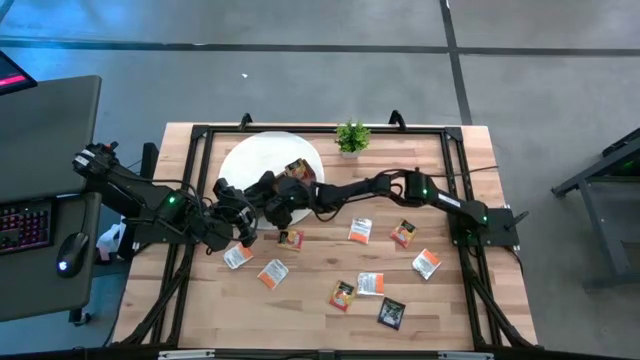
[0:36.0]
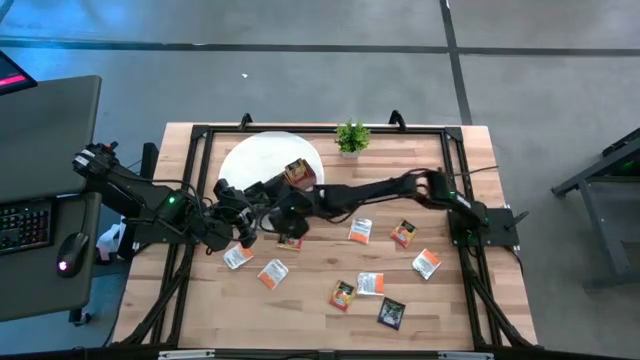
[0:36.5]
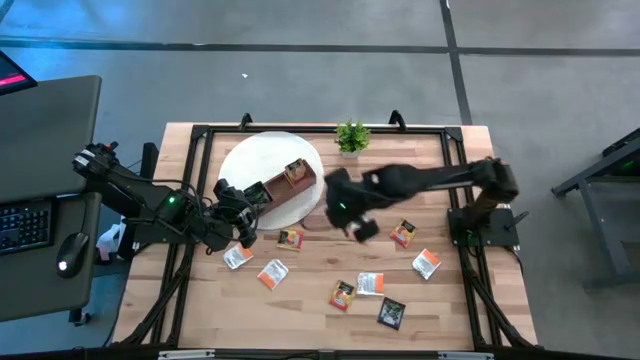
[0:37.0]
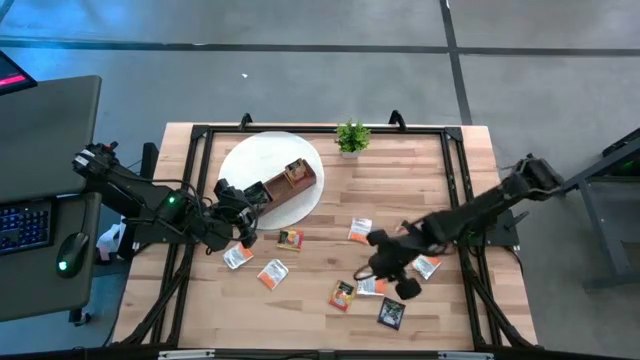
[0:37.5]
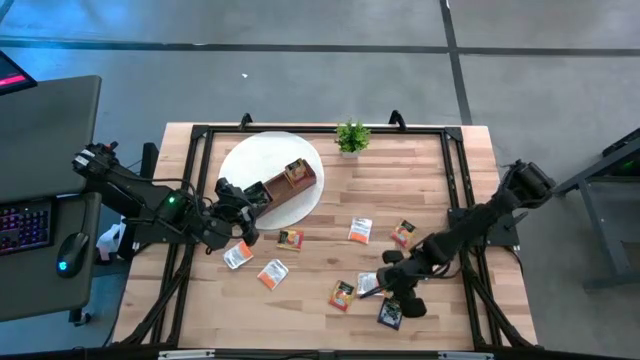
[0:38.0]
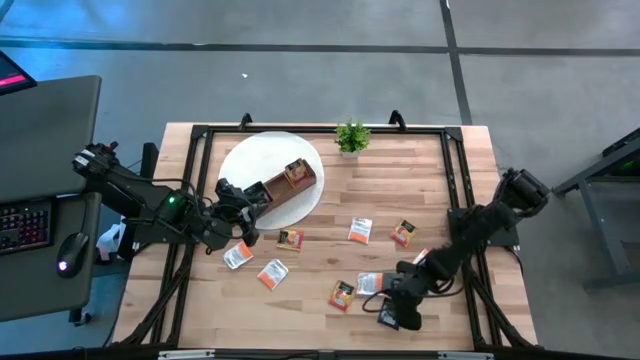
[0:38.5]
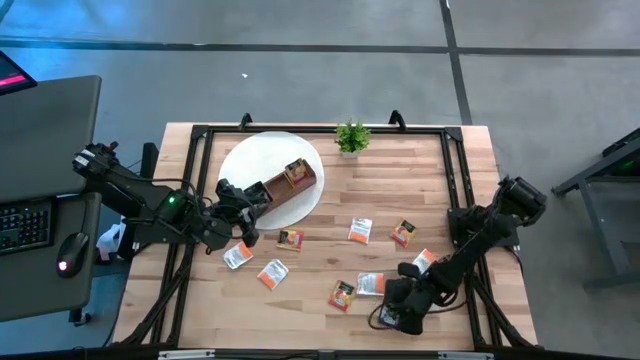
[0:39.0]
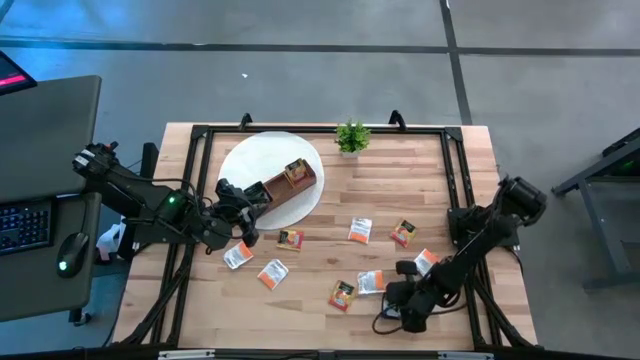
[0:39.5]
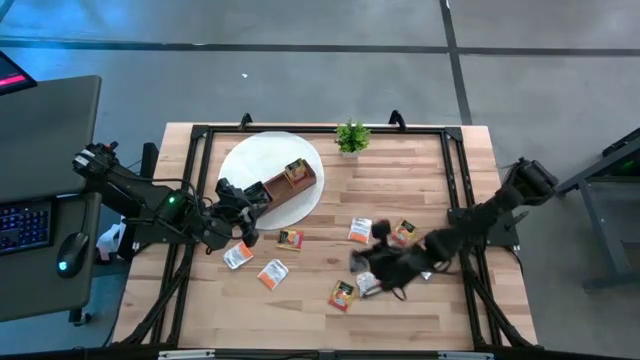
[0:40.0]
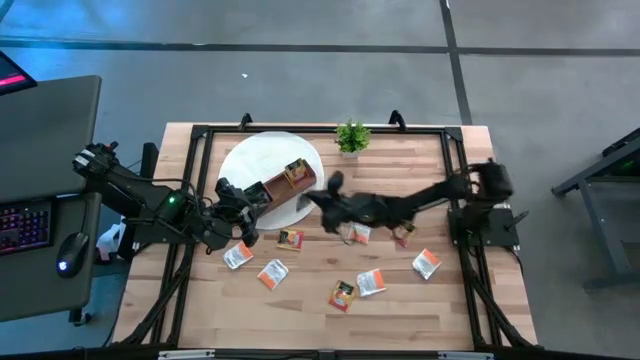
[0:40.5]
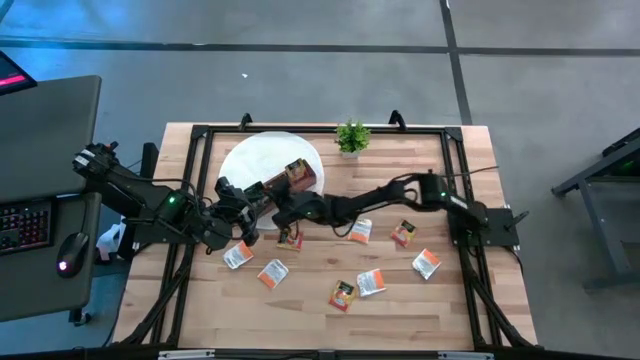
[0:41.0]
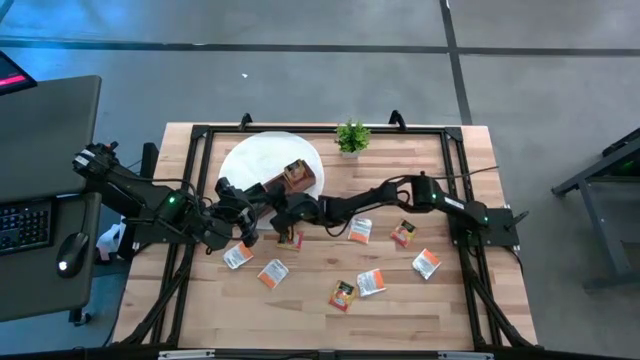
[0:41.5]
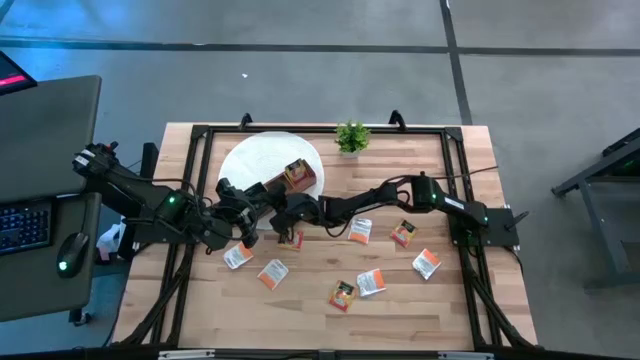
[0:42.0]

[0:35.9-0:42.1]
Task: Pick & Place Tea
Put the purple tea bag into the left section of the wooden organizer

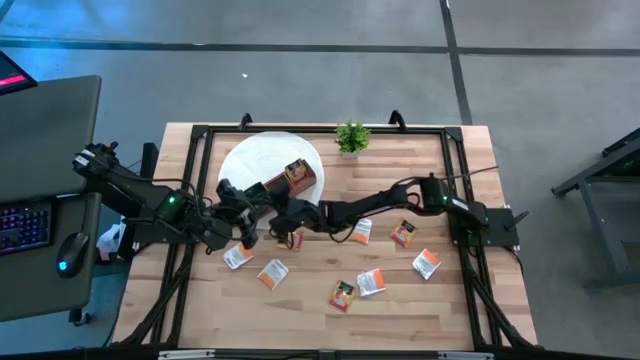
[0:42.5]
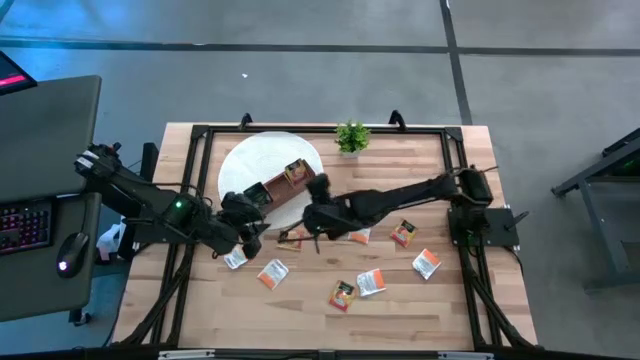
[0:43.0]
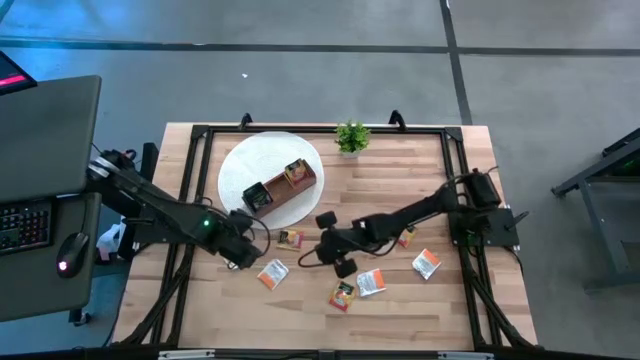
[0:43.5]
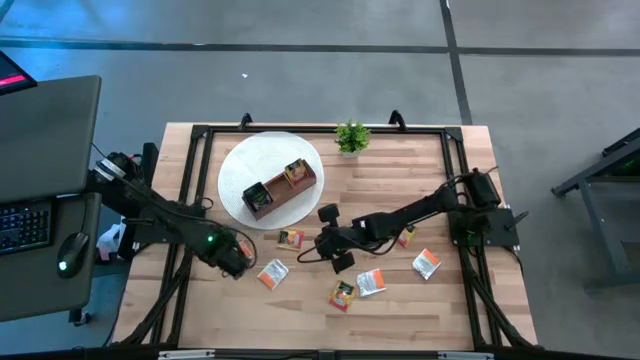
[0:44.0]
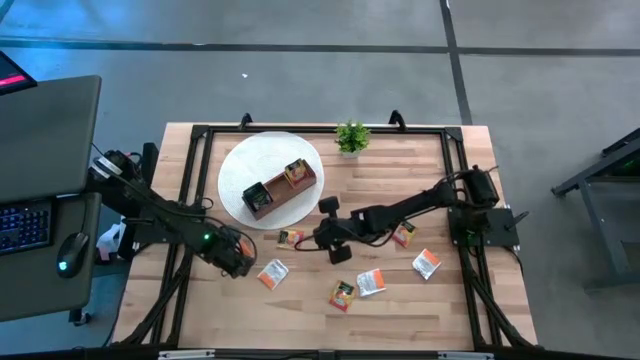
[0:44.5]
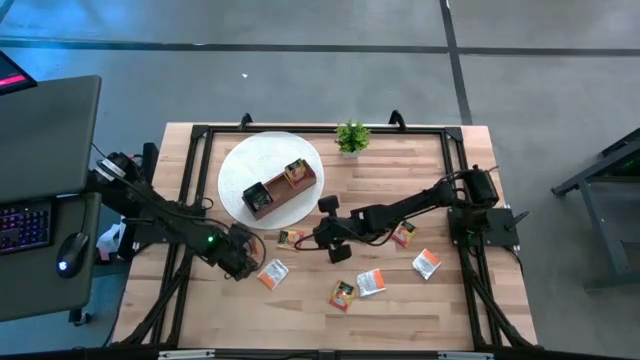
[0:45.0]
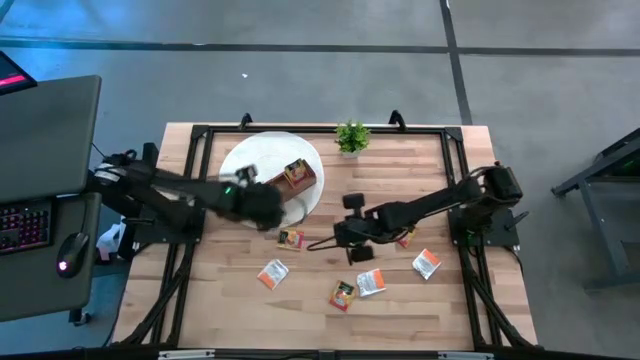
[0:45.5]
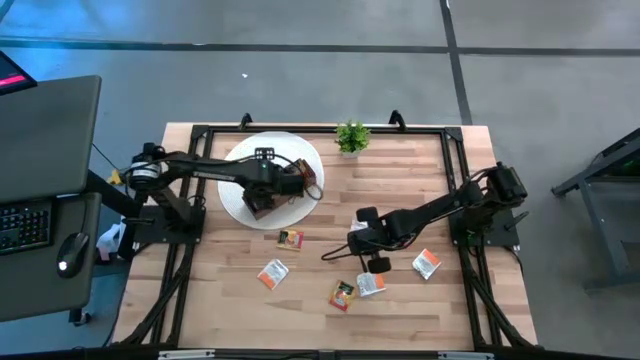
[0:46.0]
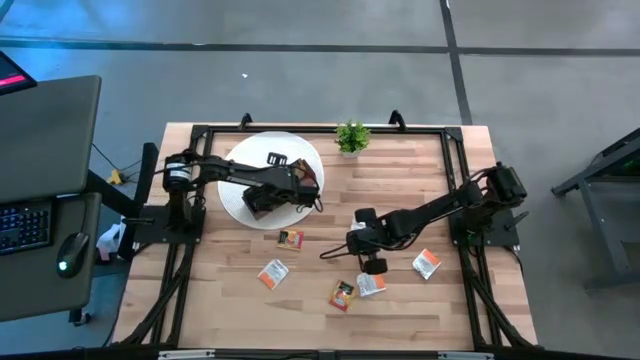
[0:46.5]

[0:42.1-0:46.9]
Put the white tea bag into the middle section of the wooden organizer

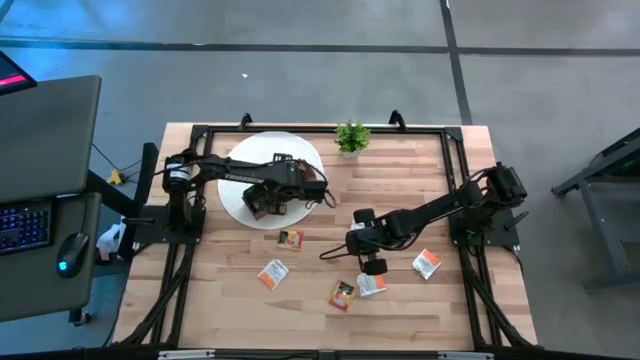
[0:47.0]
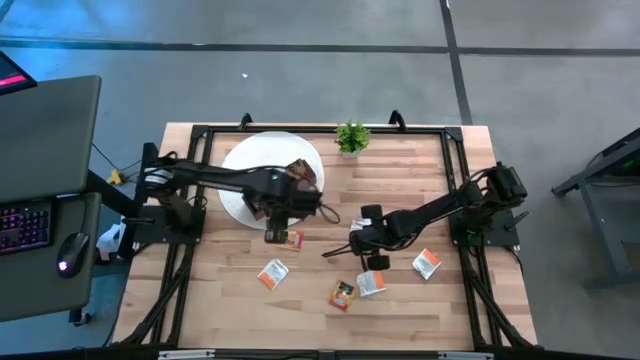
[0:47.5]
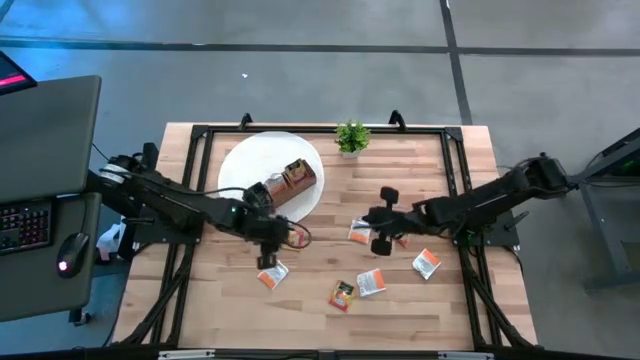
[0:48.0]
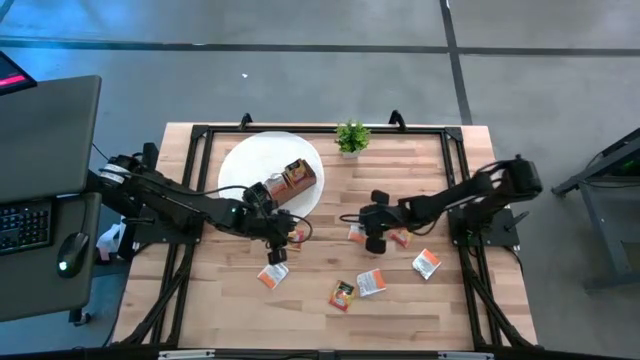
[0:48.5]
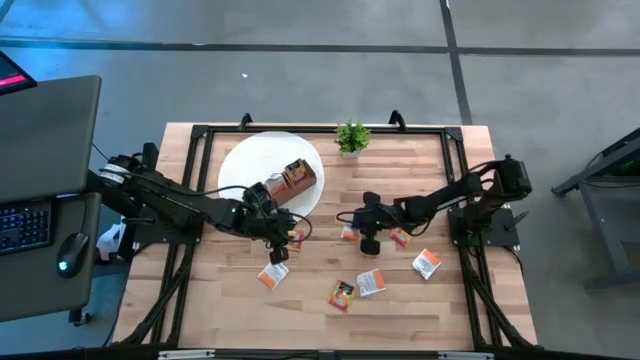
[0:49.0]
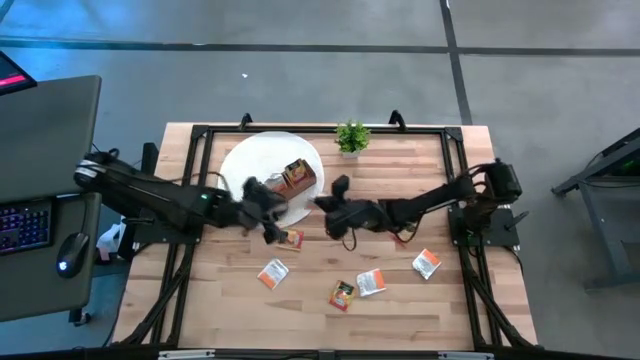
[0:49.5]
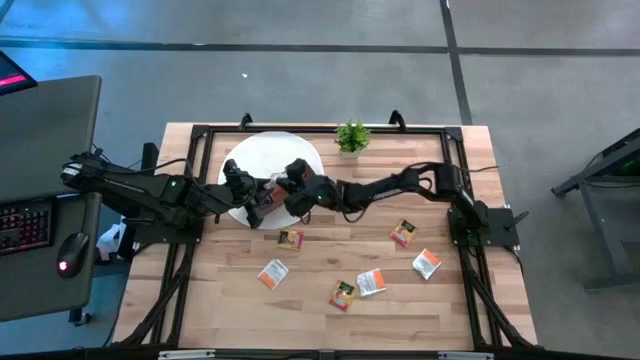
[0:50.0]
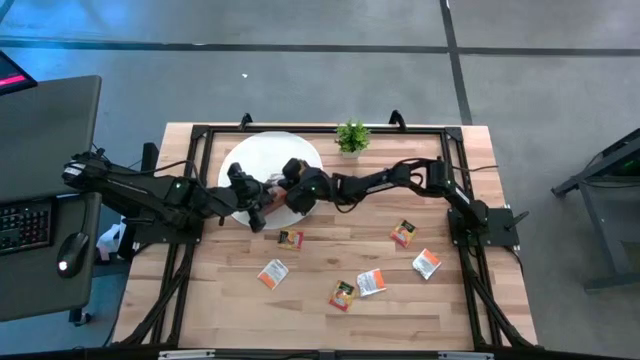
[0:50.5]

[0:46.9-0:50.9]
Put the white tea bag into the middle section of the wooden organizer

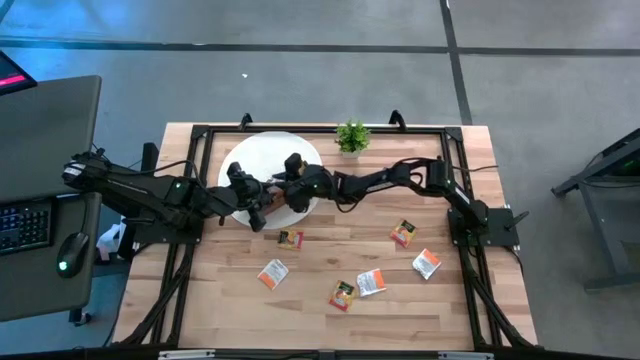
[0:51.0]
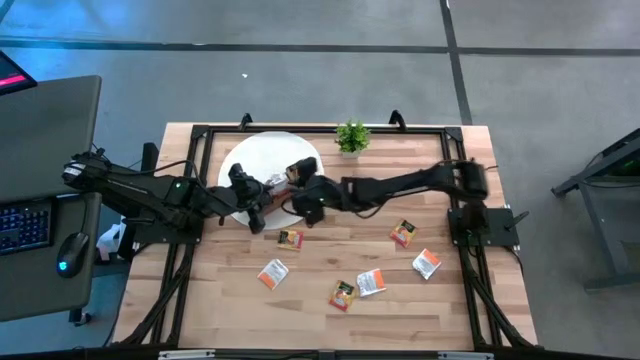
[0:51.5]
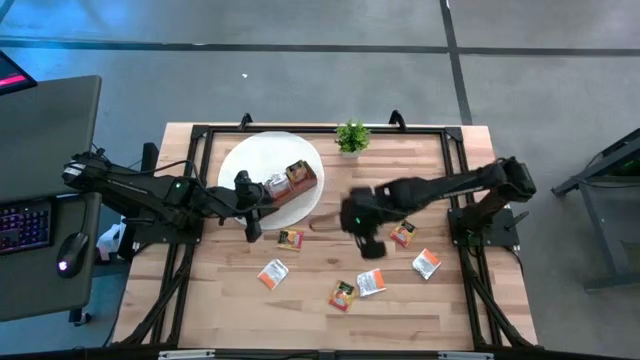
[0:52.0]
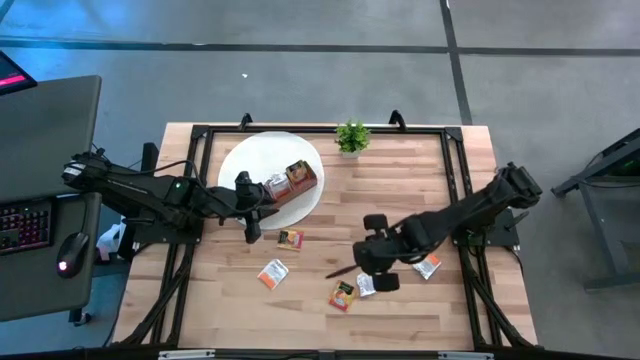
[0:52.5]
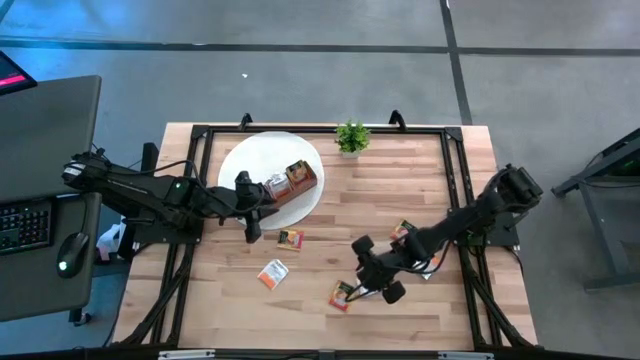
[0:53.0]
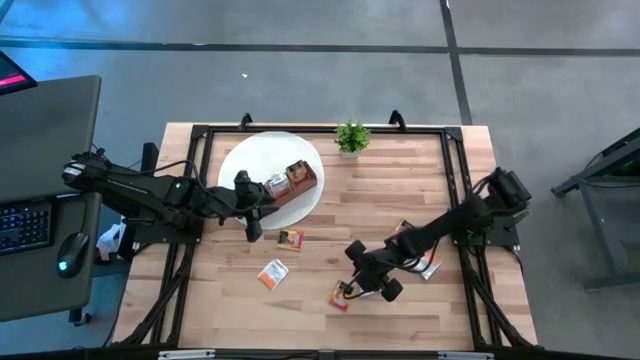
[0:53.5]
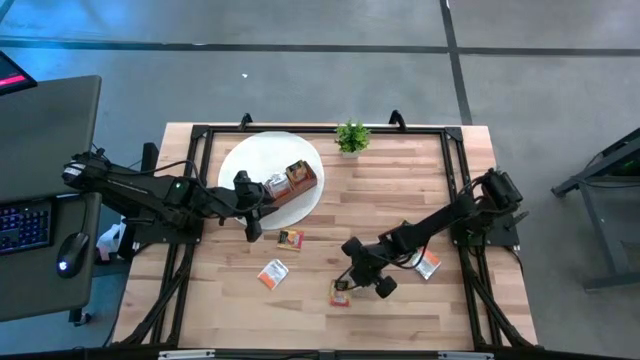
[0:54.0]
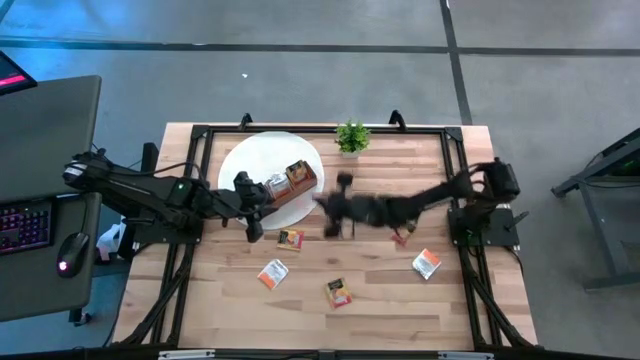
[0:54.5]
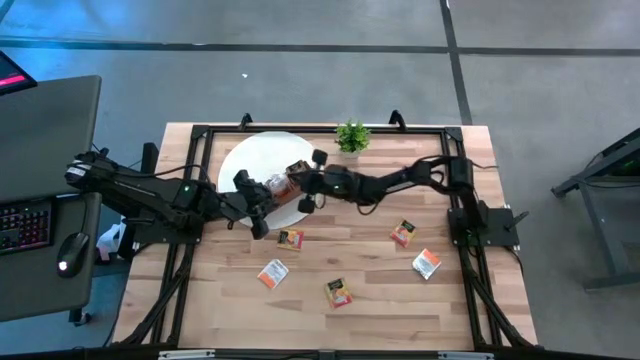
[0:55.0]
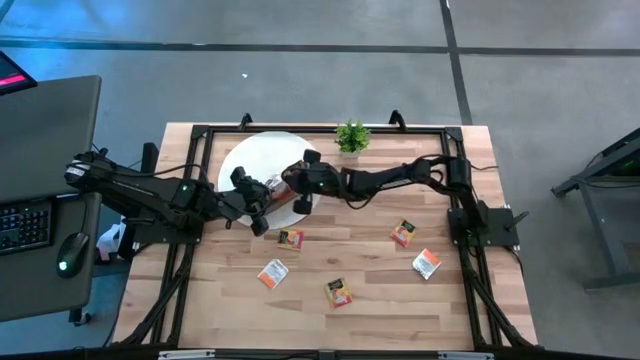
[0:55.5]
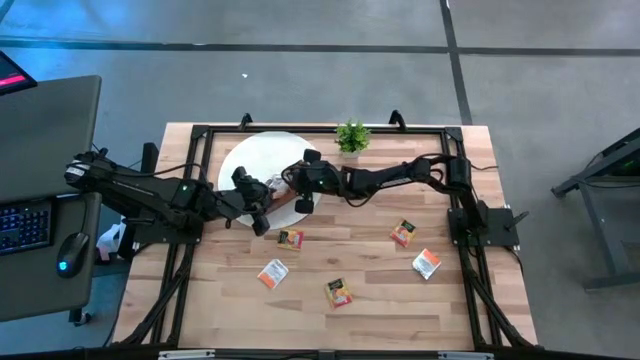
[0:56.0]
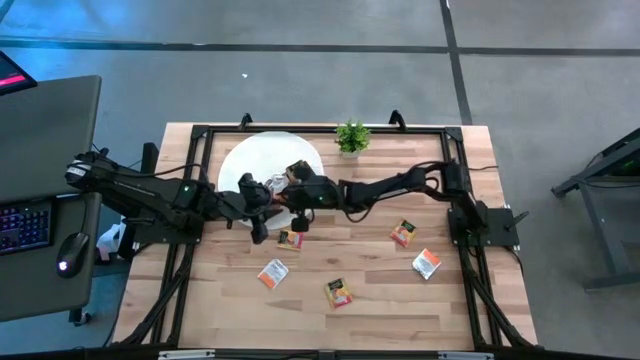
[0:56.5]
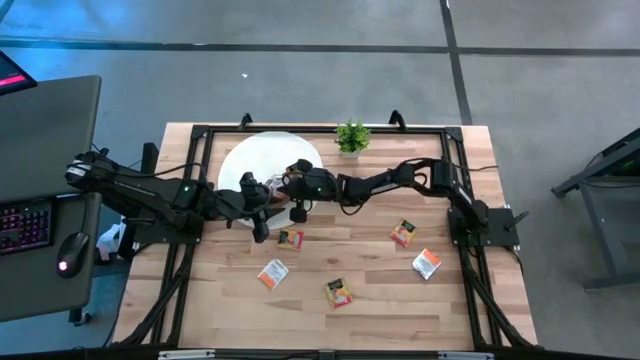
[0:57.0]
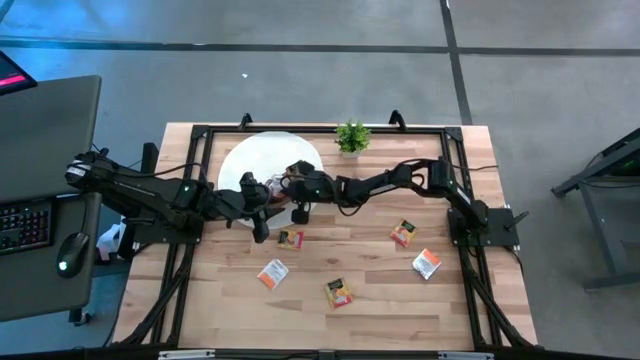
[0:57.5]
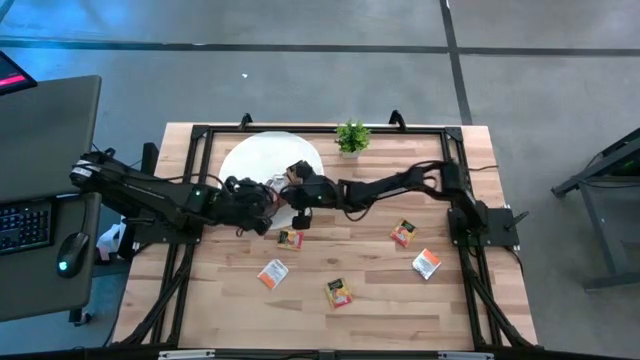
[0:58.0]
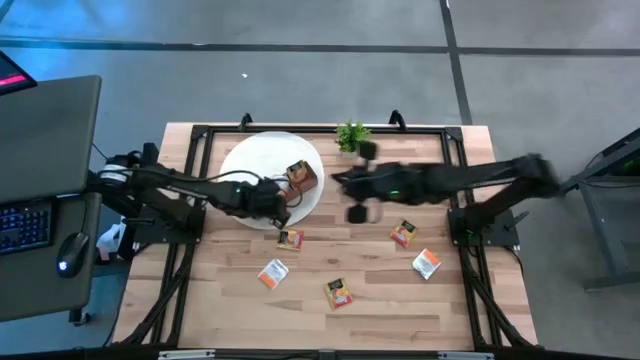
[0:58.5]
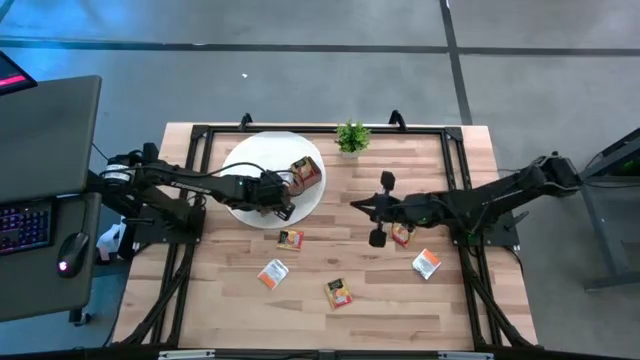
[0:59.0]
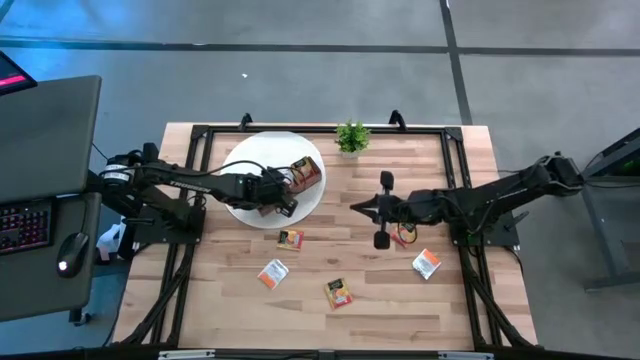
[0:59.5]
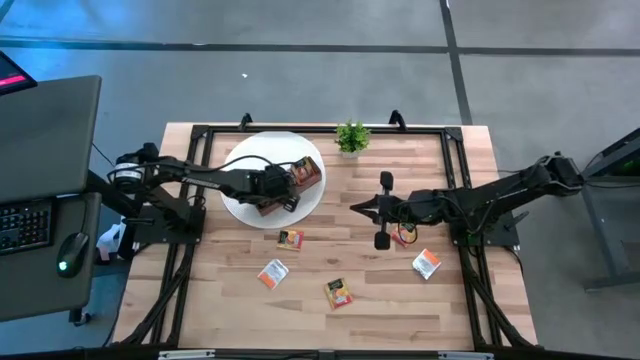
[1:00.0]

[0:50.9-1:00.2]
Put the white tea bag into the middle section of the wooden organizer
